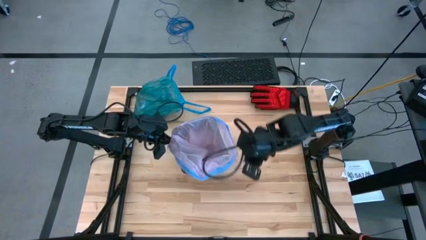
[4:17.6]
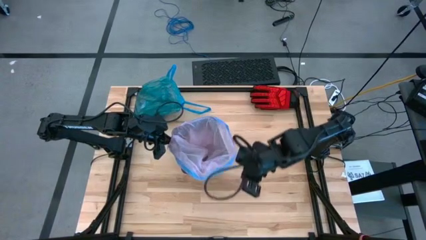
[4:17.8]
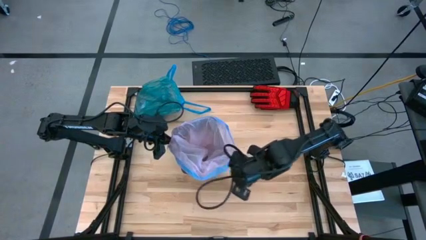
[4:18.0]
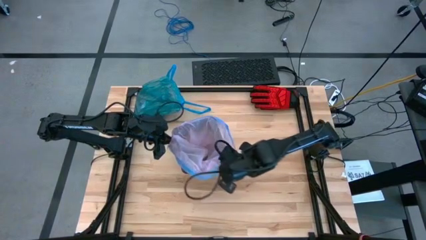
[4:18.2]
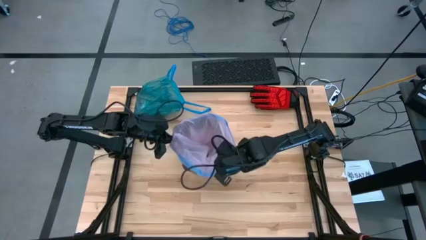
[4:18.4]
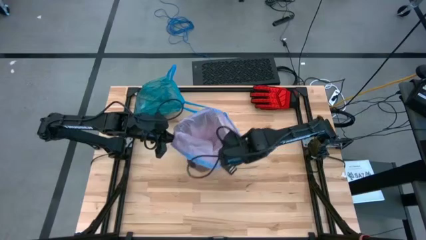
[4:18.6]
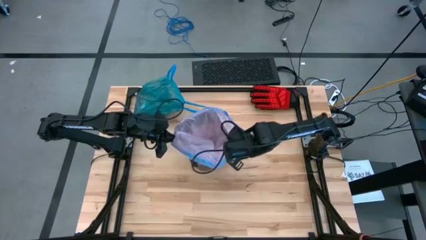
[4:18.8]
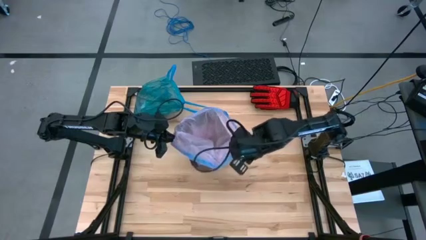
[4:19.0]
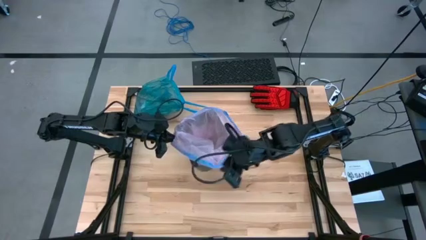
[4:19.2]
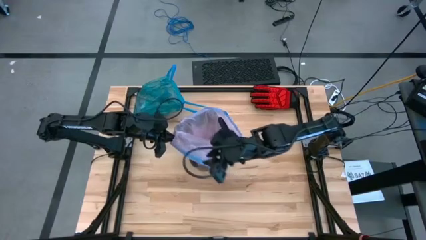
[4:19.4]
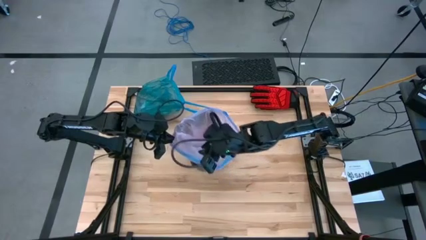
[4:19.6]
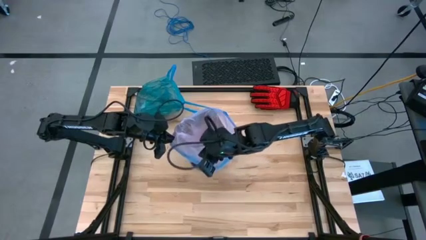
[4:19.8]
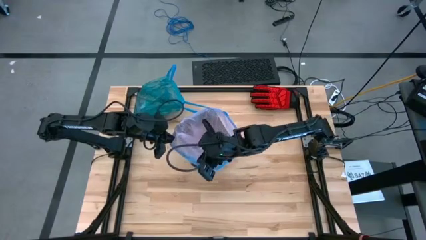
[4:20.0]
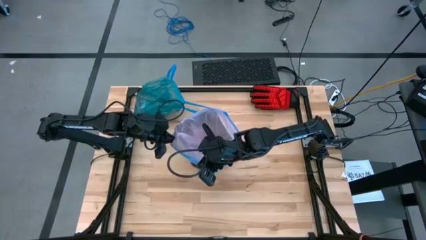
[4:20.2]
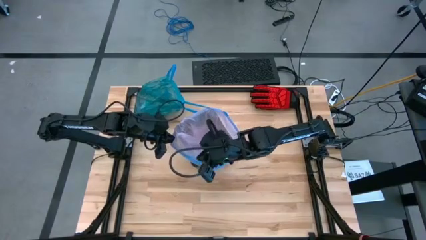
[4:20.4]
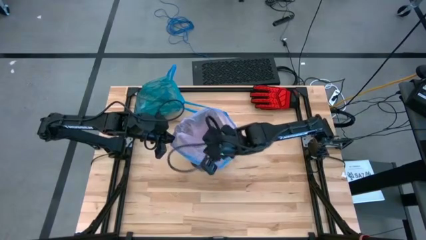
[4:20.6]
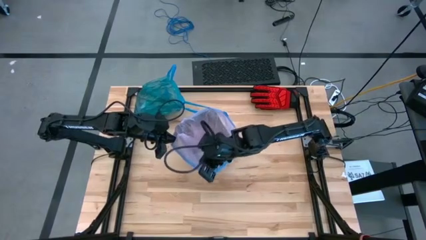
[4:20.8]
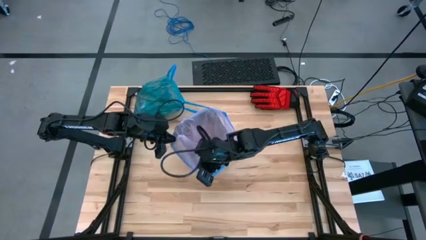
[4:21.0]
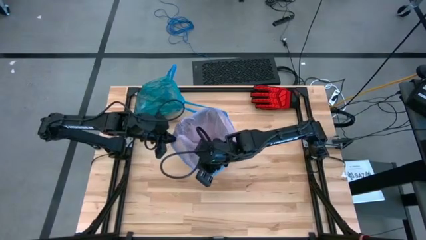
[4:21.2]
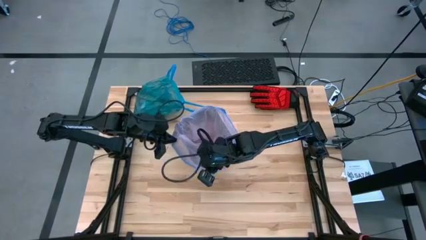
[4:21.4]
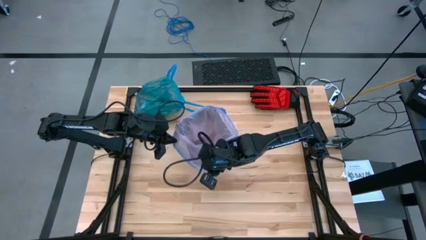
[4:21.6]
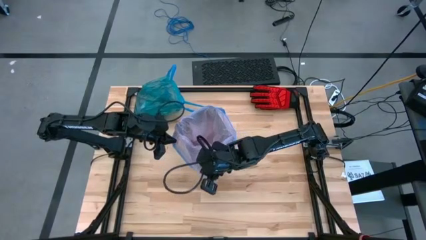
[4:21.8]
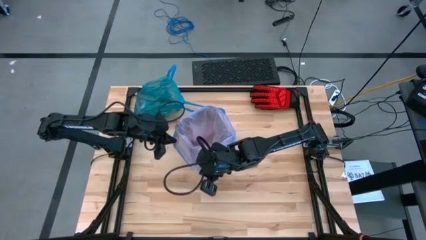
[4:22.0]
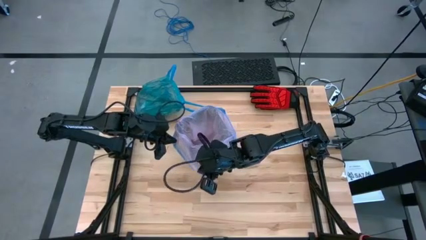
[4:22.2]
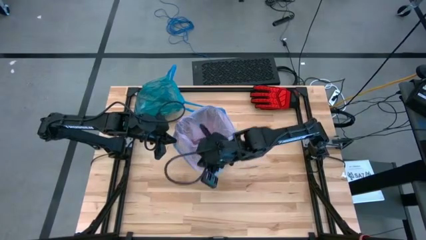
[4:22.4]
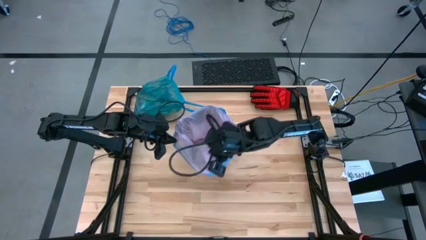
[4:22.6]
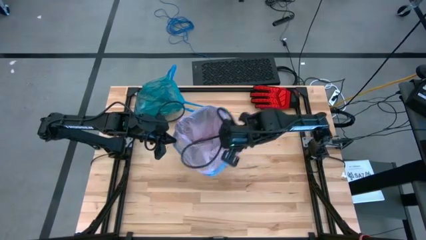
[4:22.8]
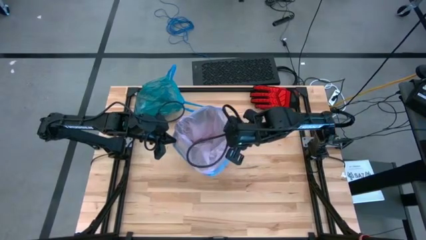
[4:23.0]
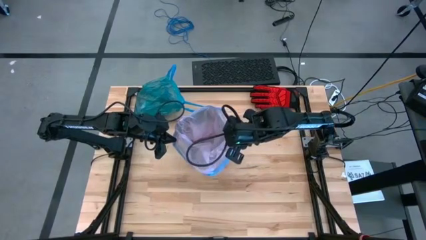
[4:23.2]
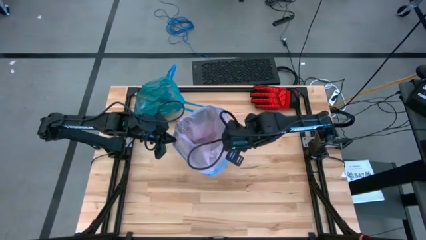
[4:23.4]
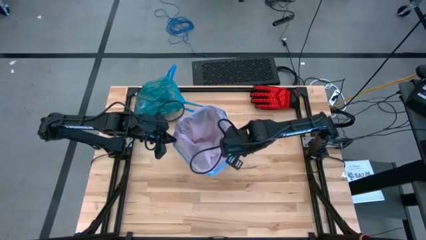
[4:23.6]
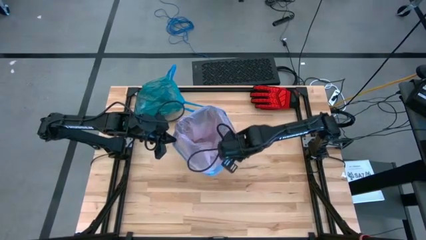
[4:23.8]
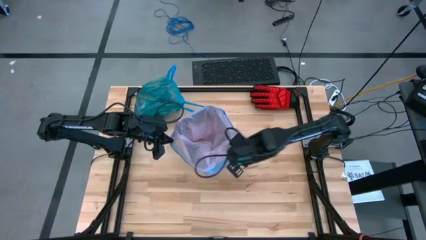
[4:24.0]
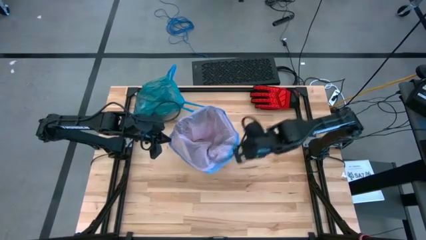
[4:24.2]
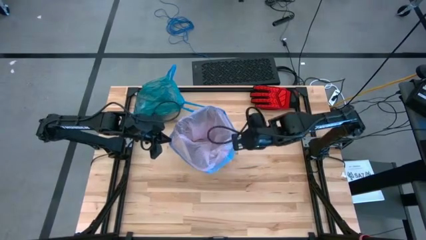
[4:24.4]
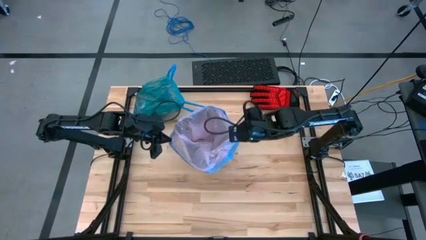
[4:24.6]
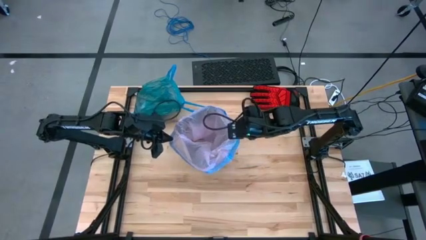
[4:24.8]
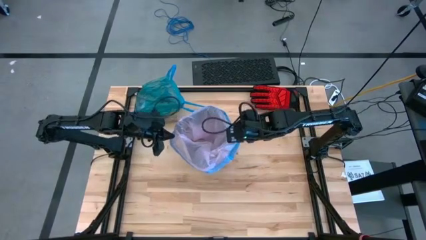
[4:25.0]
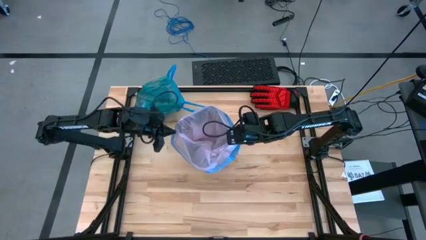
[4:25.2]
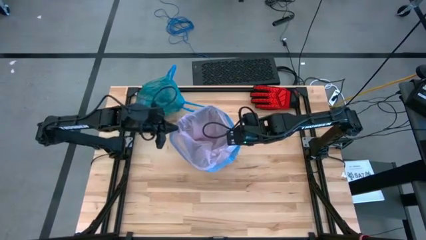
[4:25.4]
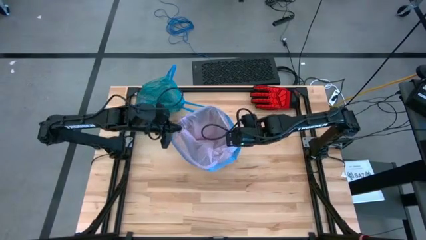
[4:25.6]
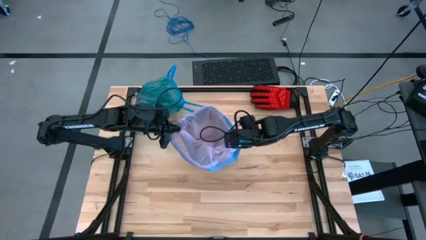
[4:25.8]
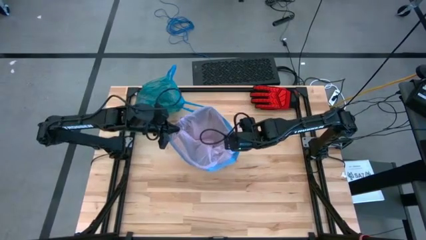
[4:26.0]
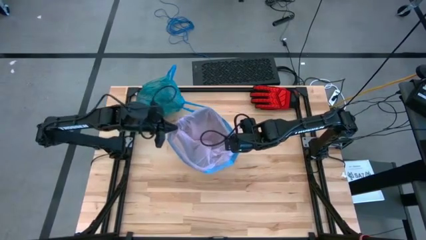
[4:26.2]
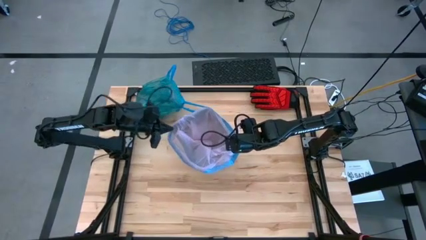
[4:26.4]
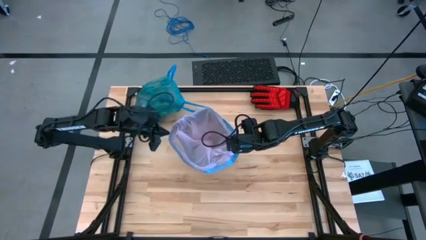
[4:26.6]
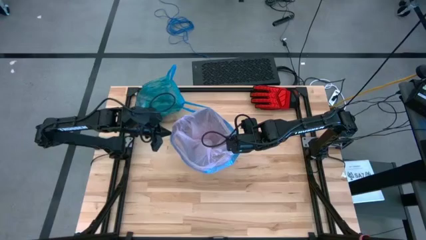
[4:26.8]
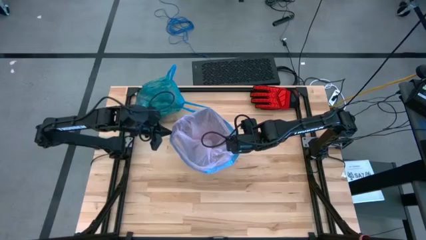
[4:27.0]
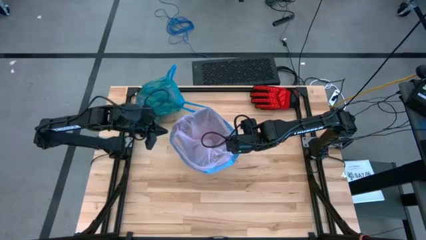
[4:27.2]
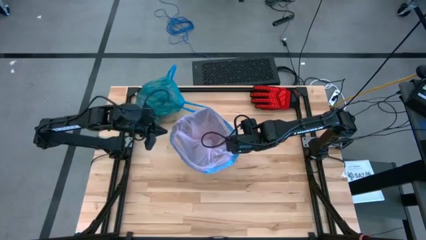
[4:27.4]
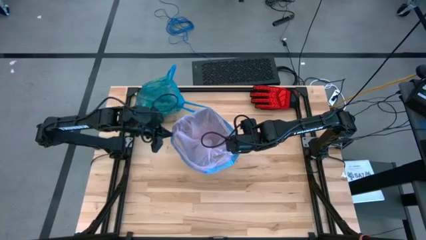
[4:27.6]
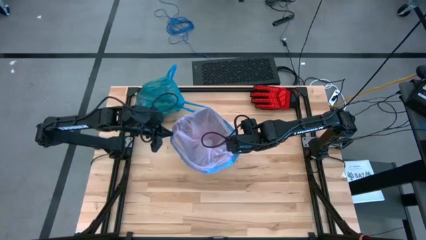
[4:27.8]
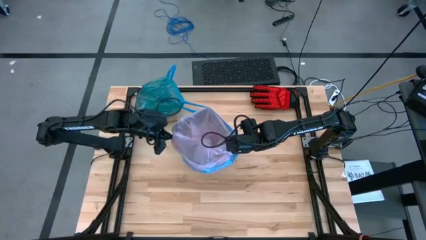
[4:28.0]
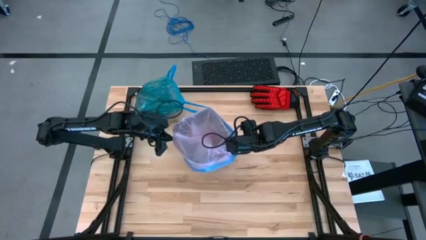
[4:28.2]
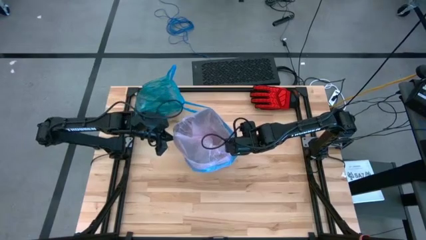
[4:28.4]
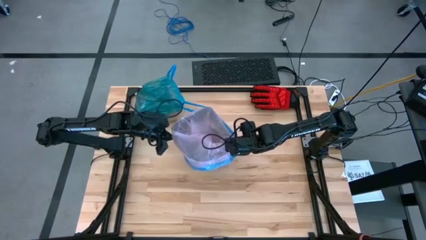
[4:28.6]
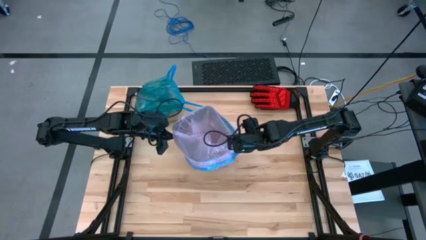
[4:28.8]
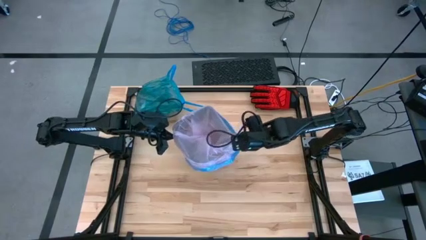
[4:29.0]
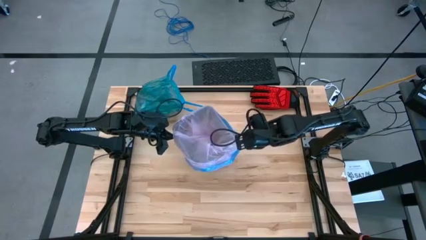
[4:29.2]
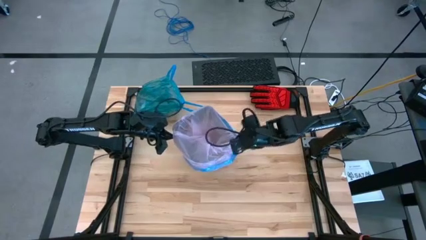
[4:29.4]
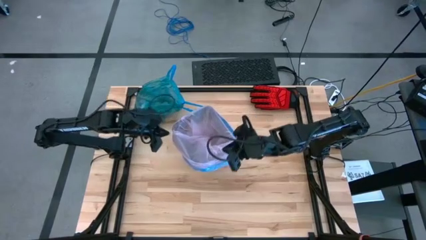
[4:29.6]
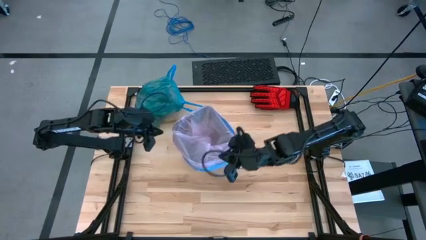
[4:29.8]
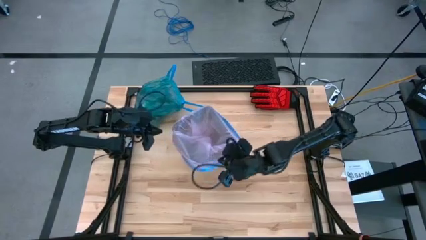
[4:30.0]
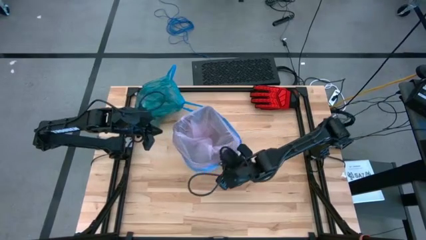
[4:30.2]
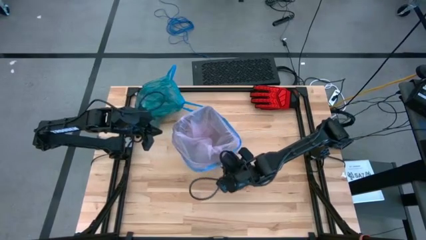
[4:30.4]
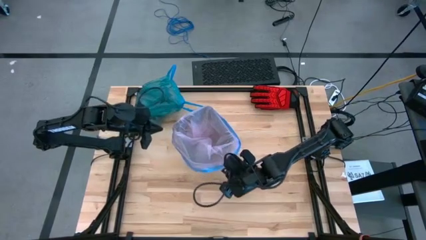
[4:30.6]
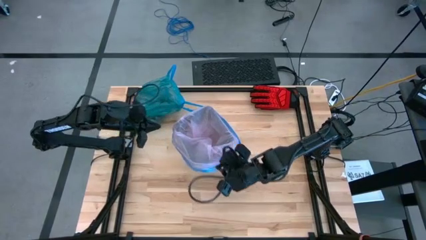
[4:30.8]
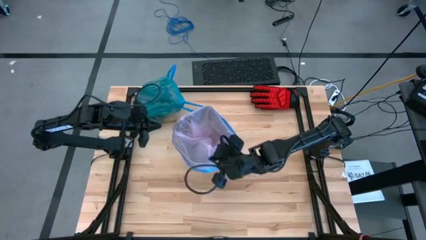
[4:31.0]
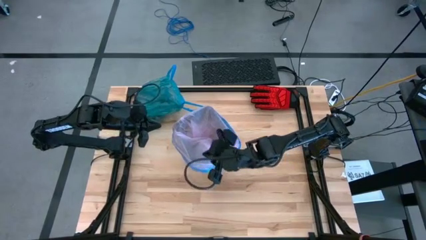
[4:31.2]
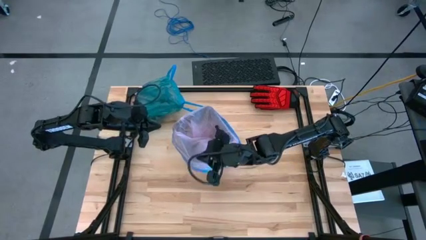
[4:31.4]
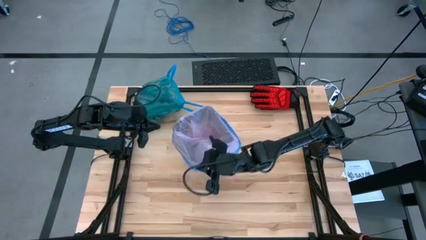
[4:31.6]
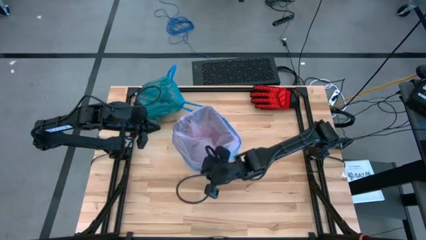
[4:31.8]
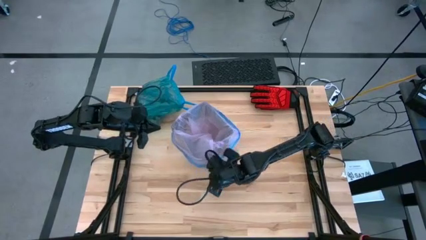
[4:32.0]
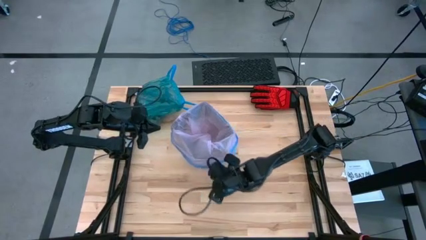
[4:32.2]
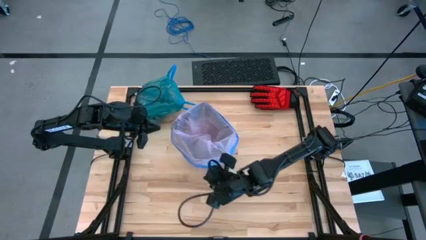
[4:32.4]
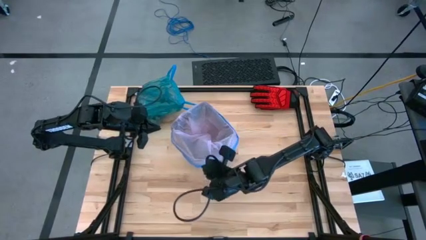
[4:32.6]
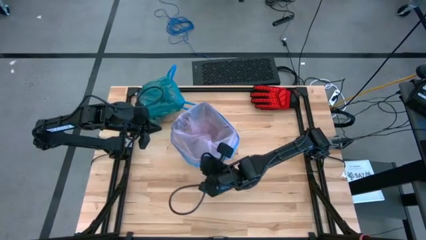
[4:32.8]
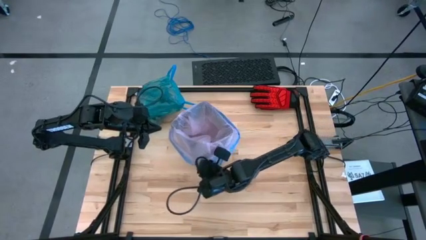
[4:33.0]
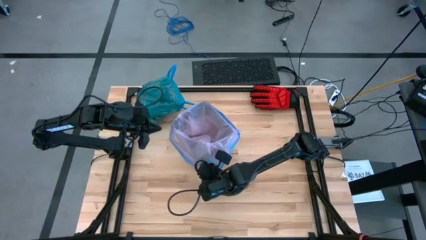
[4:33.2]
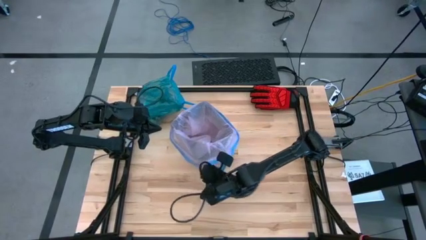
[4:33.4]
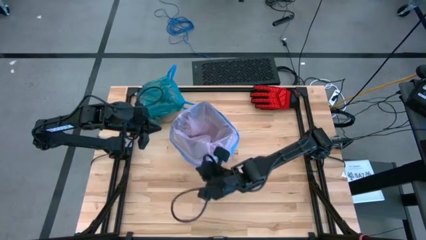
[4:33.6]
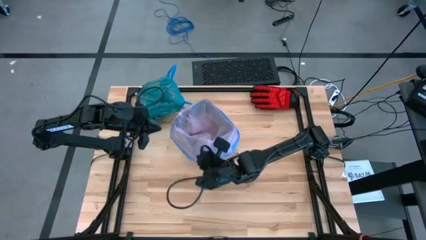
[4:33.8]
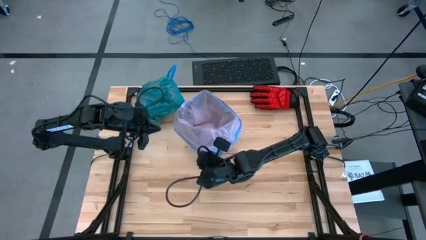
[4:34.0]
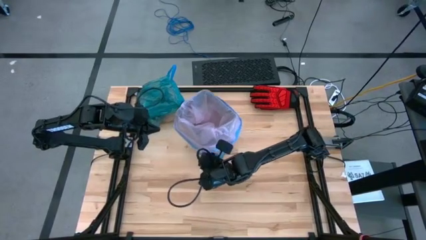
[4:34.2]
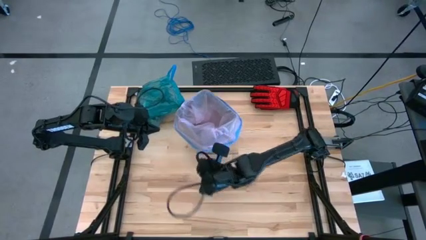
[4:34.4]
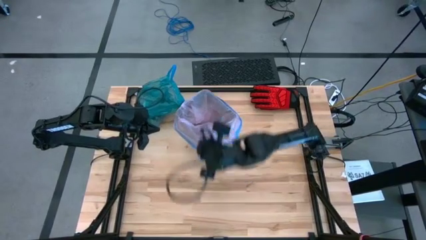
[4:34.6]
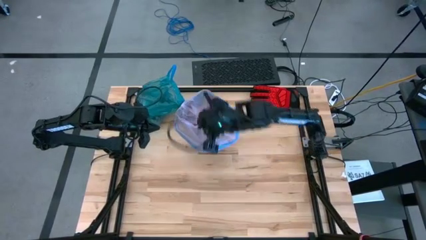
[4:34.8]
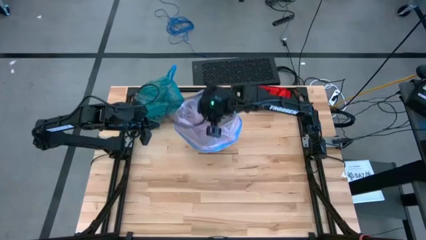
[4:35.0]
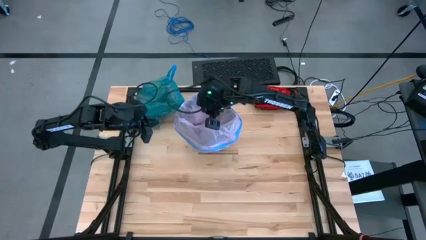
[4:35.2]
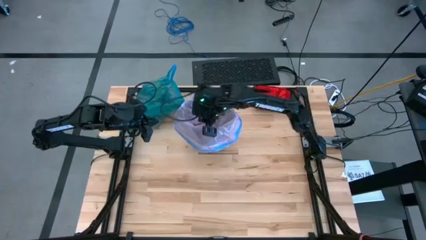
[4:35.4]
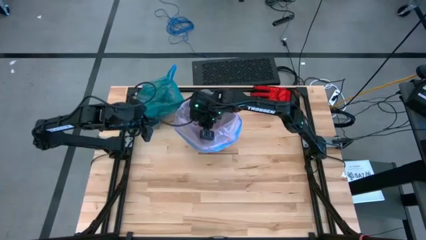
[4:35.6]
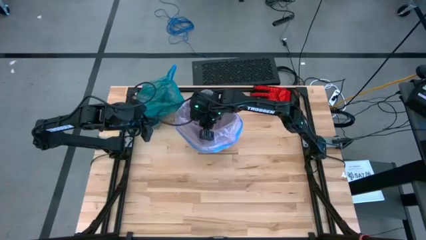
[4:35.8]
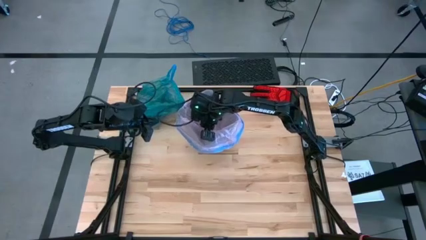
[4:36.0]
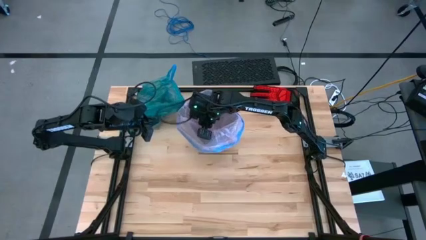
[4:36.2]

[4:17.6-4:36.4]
Task: place trash/remove bag and relplace
Insert a new pink trash bag into the black trash bin
